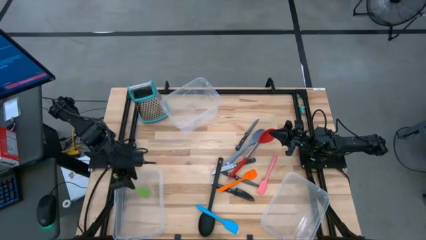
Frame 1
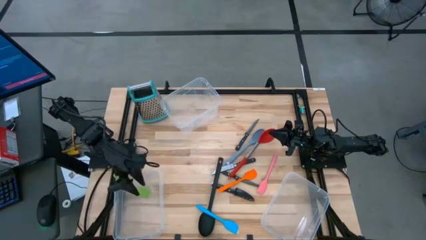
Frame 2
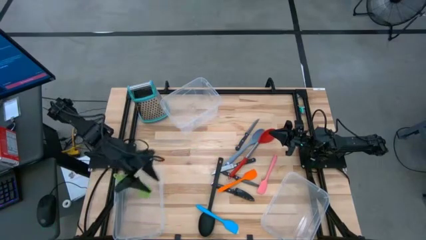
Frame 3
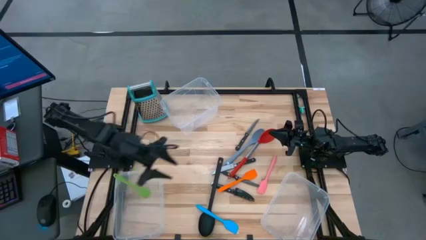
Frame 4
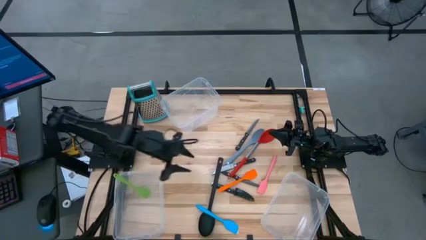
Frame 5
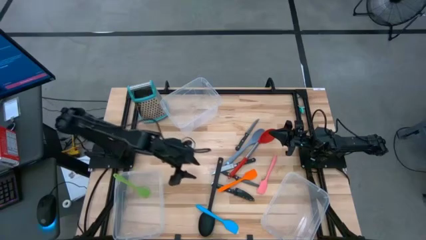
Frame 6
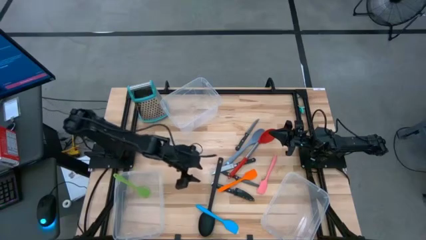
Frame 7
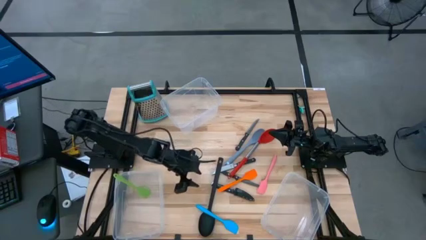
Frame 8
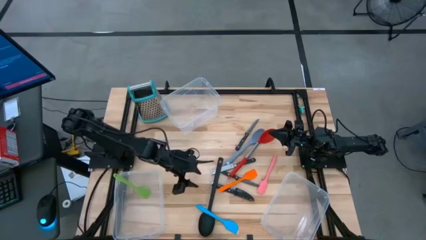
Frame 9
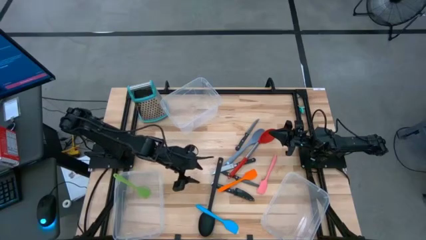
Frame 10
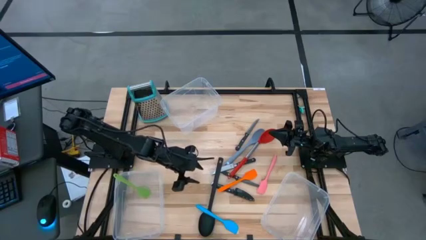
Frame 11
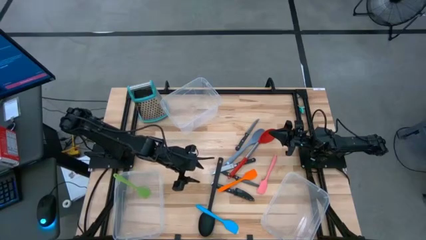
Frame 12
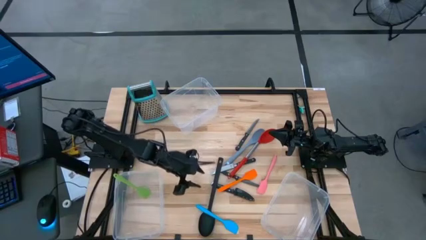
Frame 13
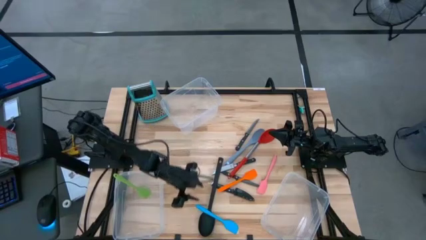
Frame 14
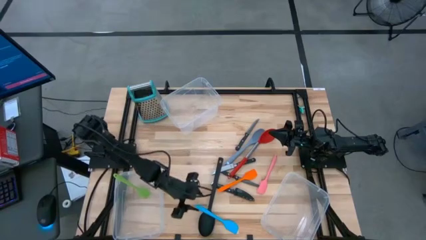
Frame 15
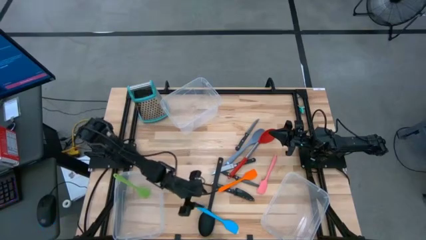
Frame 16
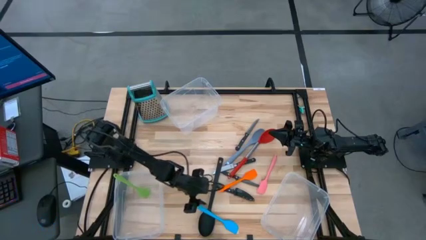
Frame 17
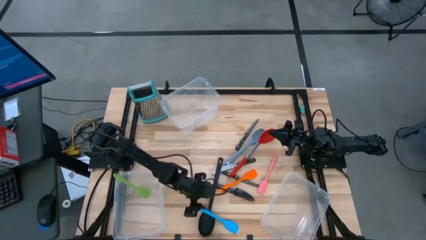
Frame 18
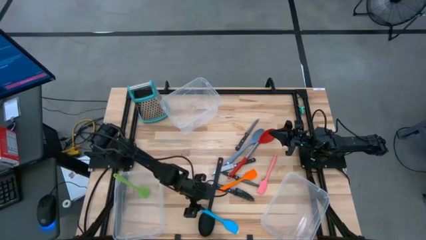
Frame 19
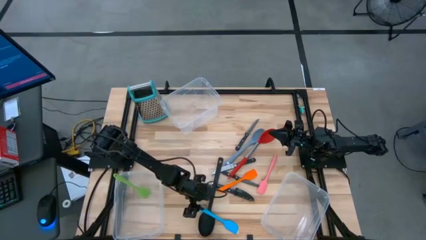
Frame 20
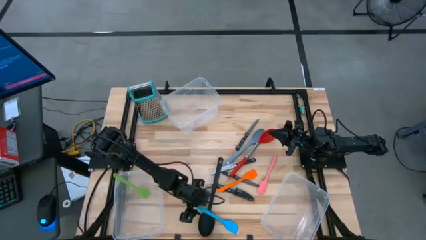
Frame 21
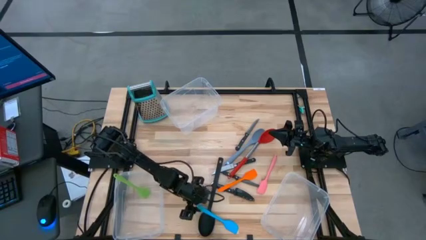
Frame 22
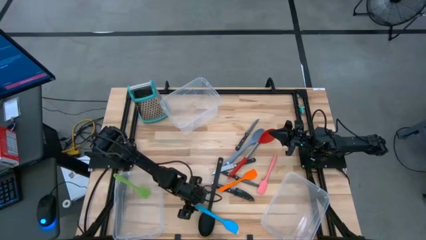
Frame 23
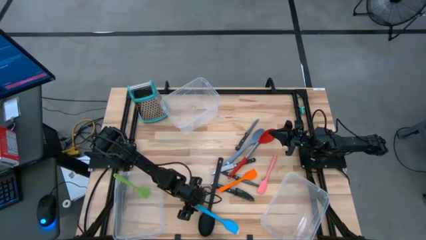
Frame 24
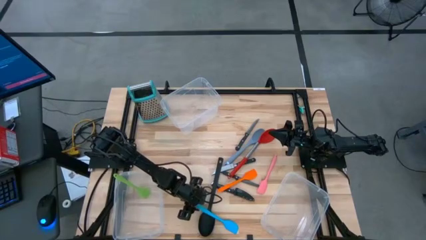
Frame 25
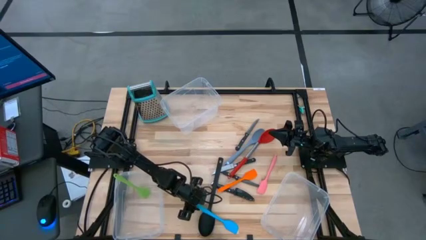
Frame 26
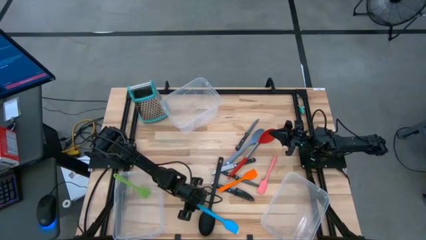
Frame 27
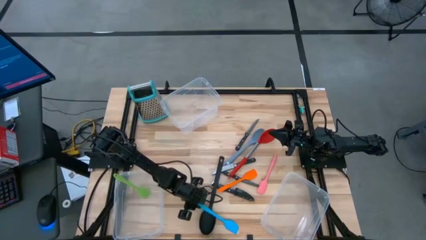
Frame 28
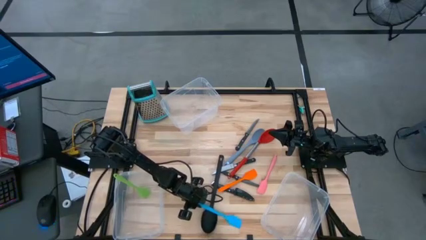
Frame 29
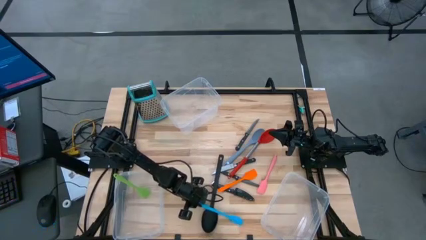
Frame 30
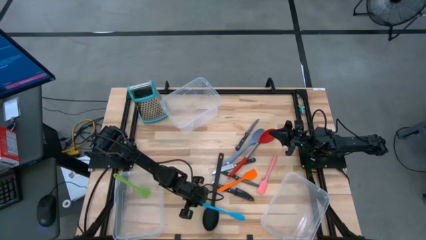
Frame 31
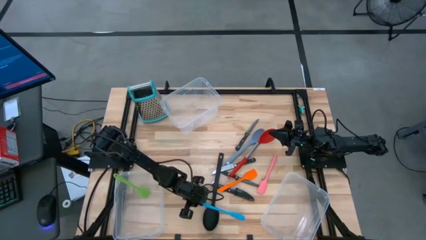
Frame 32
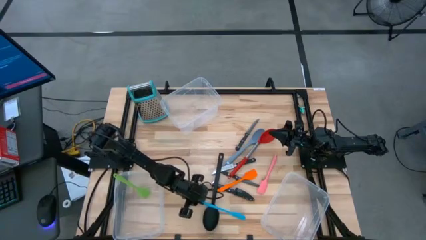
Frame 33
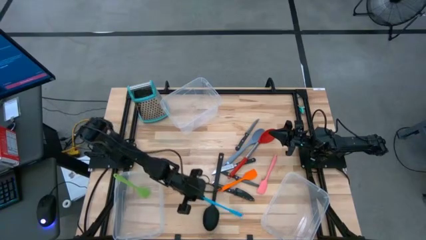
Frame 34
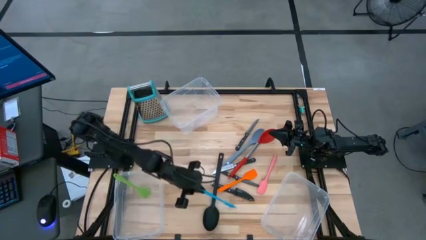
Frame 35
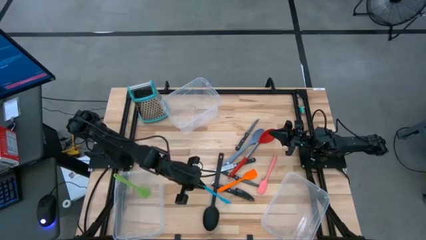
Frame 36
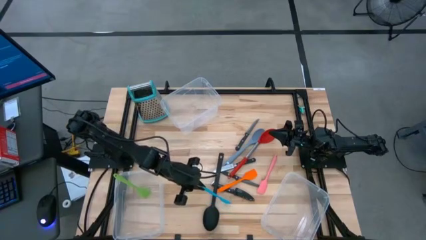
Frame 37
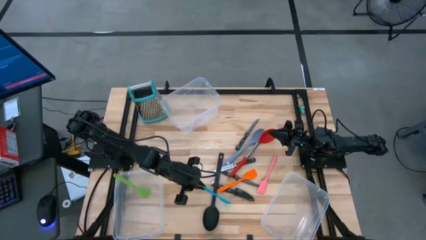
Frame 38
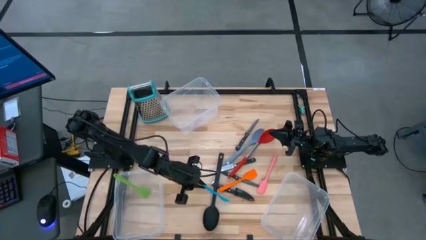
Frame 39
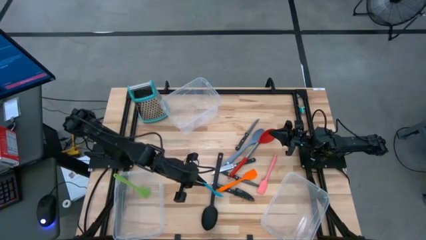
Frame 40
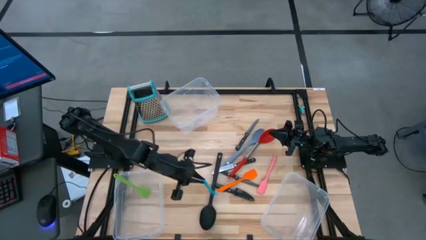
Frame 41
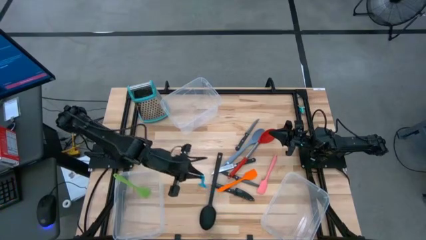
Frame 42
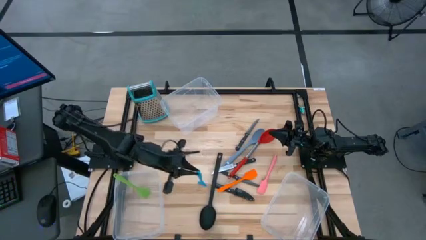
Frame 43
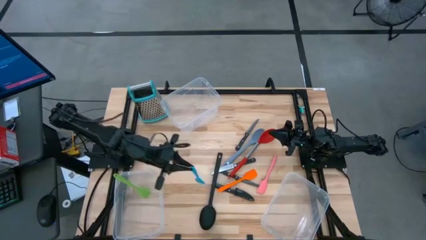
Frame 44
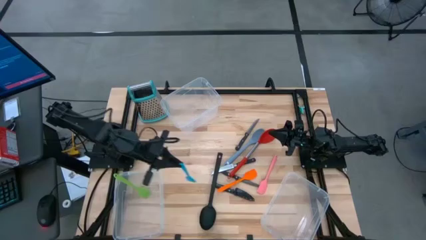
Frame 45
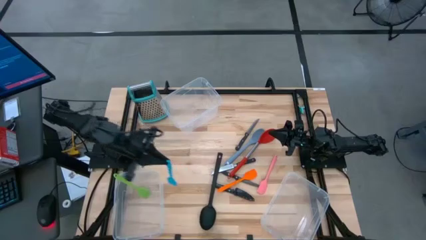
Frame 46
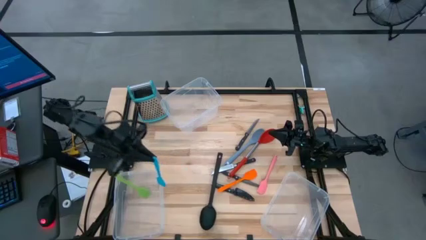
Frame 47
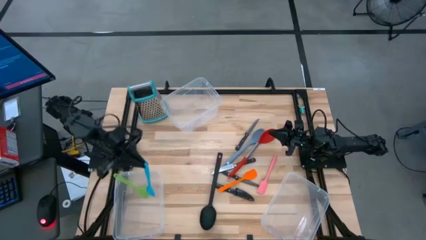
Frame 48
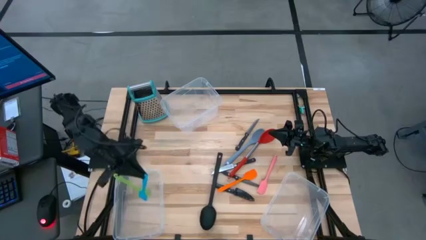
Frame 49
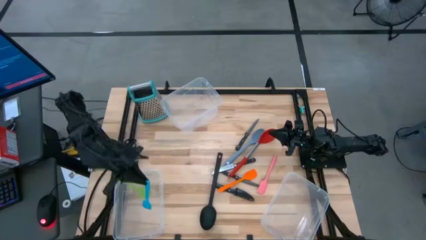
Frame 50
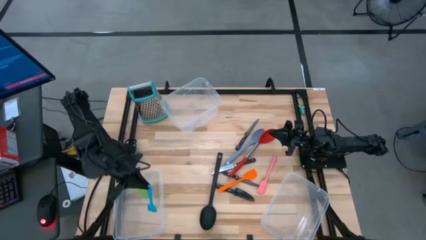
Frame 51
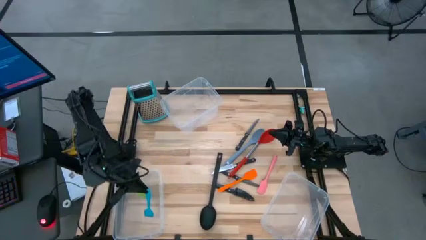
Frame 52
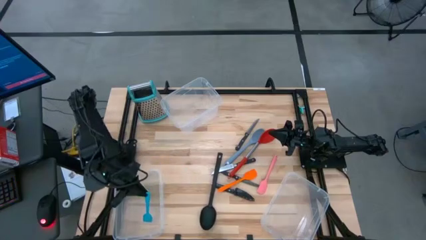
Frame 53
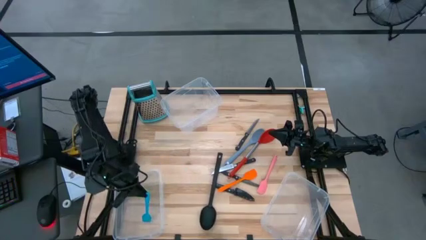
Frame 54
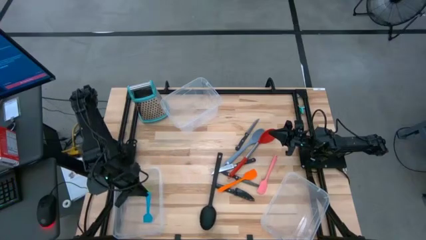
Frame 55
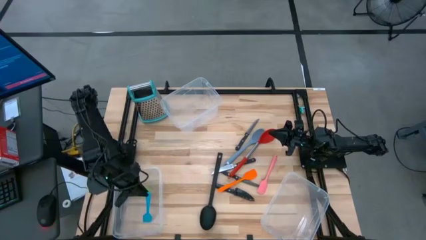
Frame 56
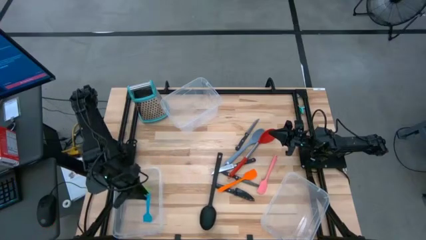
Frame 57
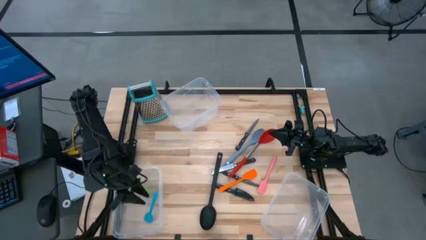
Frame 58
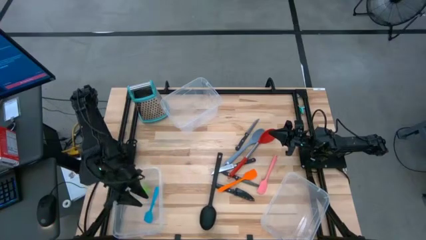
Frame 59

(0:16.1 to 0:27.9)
Task: Pick & Place Kitchen Items
Put the blue spatula into the bottom left transparent bin

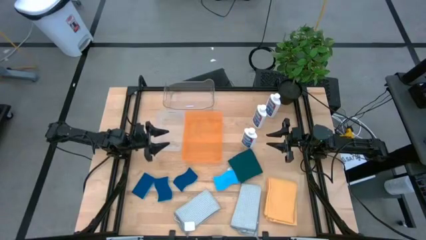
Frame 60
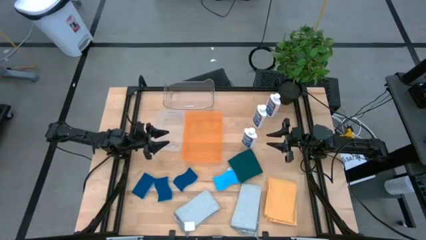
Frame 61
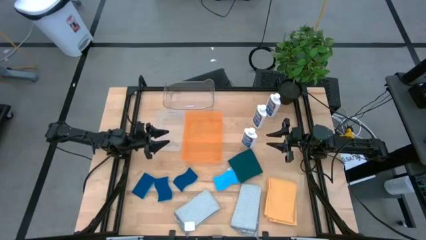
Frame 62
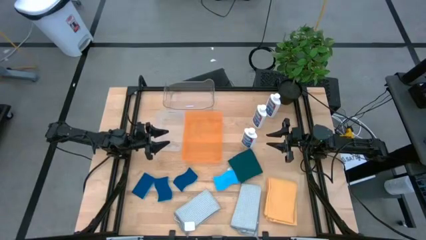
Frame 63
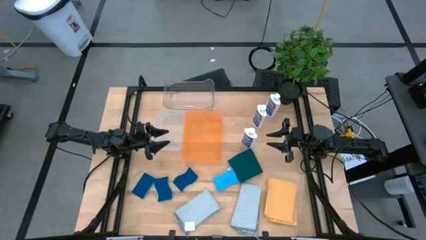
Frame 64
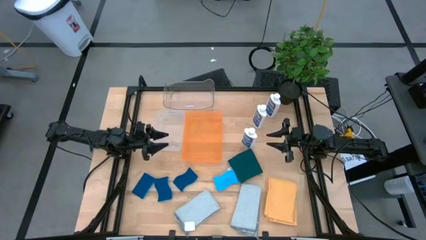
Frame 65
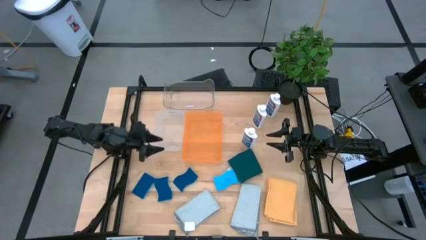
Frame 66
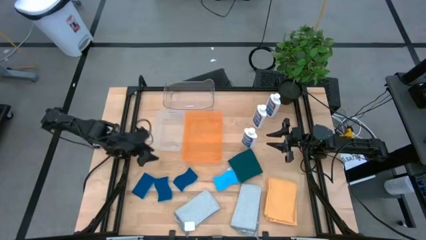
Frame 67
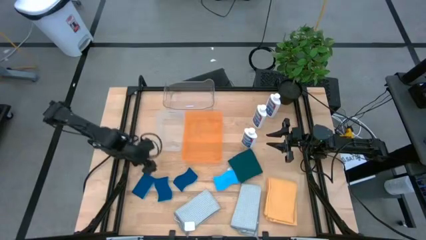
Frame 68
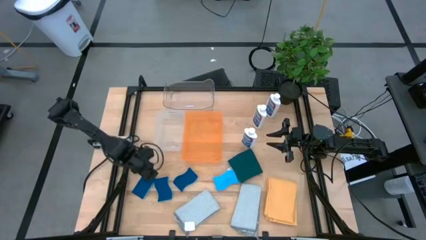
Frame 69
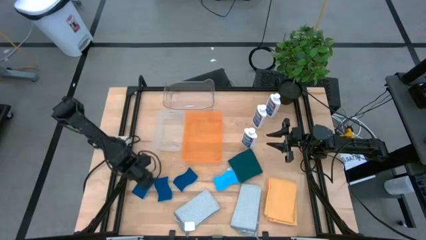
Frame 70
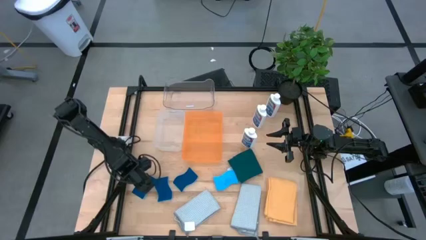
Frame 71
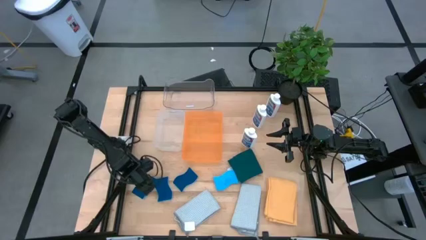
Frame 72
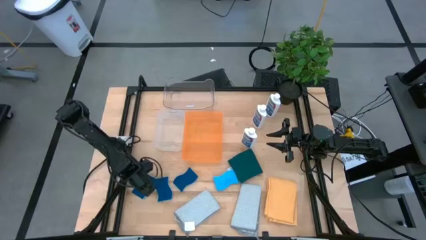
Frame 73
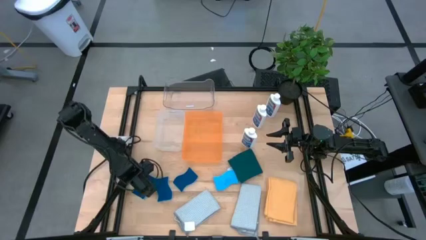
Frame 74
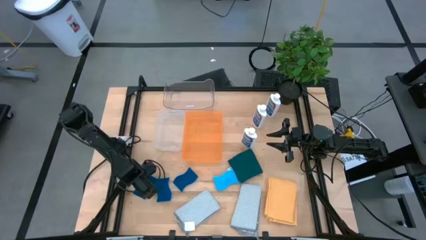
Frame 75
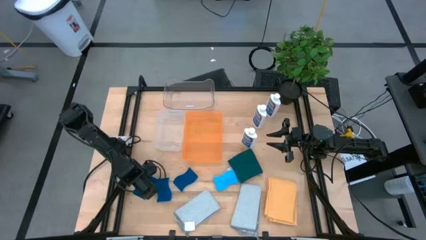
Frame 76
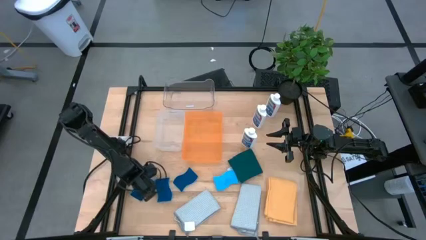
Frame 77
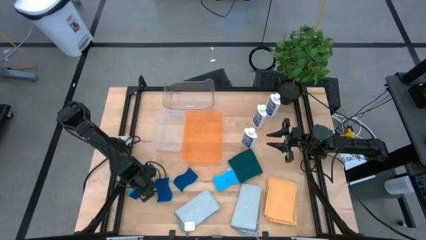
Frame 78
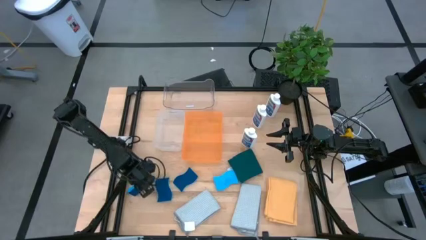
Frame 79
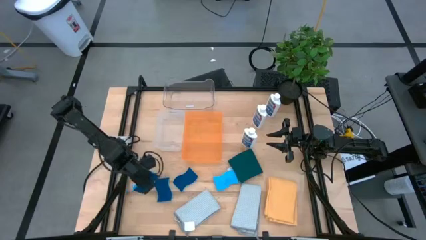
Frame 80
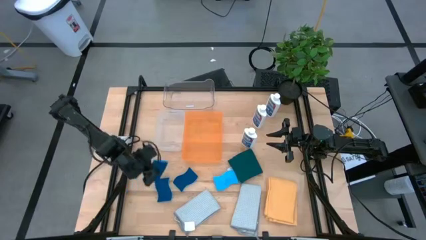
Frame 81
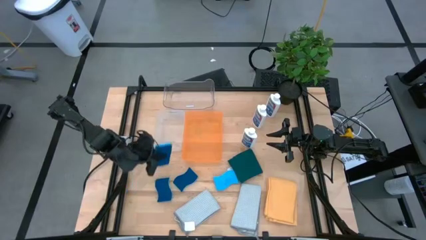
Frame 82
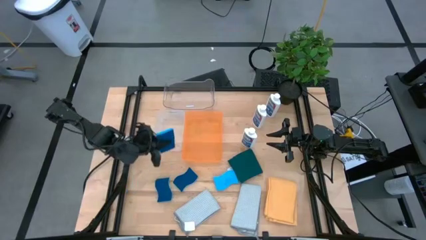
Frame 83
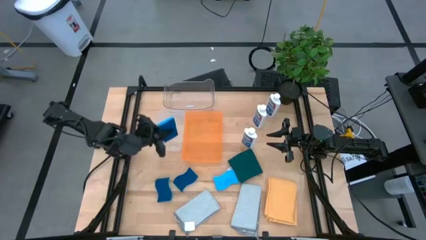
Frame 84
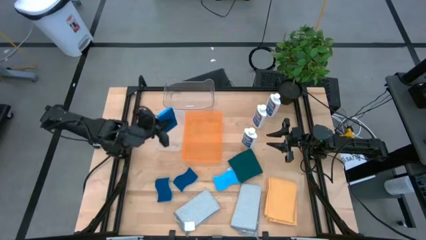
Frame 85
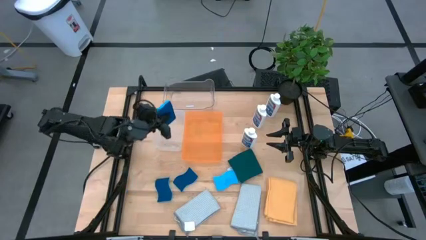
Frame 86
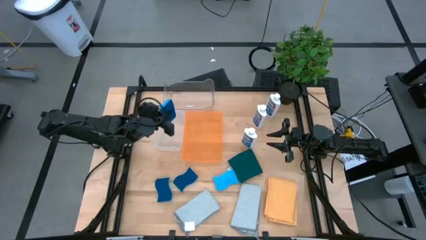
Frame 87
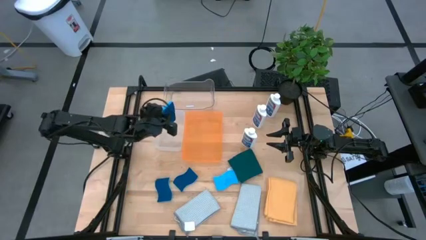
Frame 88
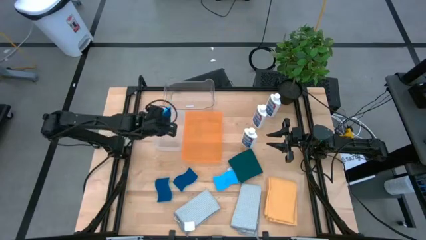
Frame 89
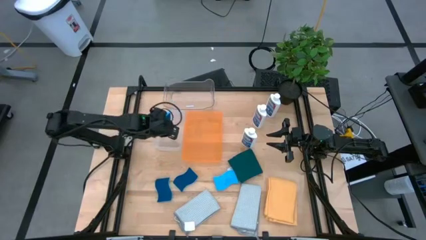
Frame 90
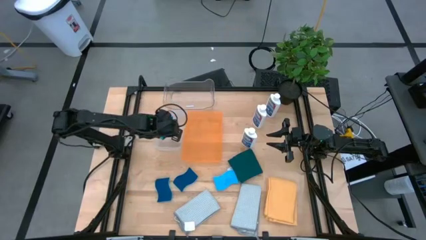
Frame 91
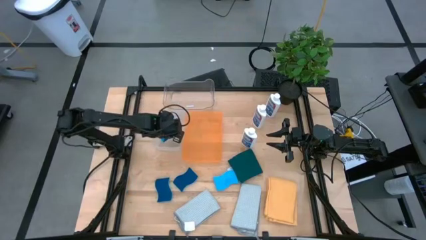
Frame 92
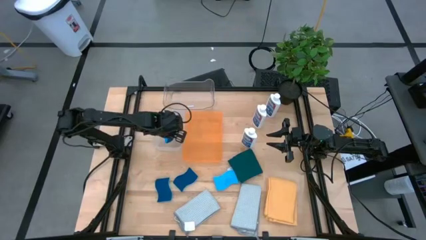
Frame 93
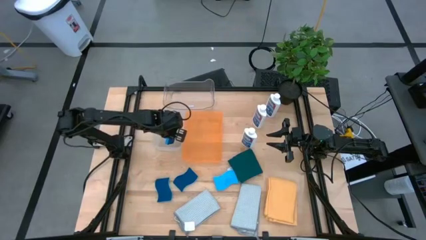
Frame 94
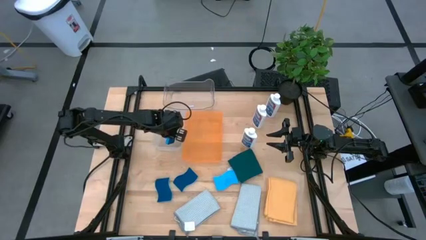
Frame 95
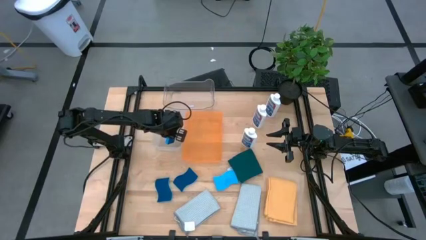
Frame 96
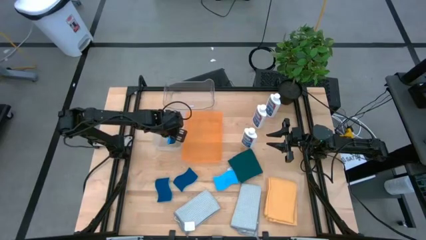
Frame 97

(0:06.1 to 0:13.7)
Task: Pick & Place Kitchen Items
Put the sponge into the white bin
